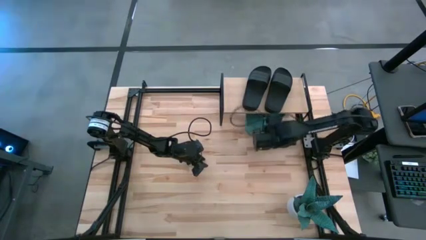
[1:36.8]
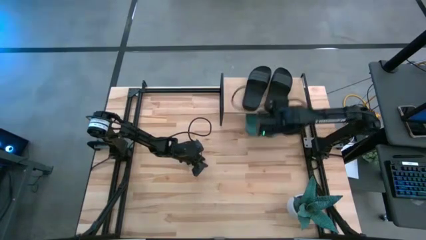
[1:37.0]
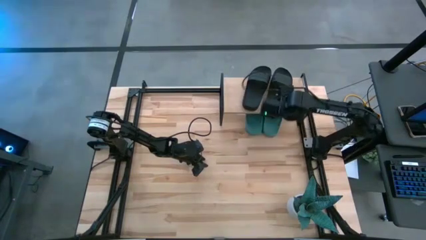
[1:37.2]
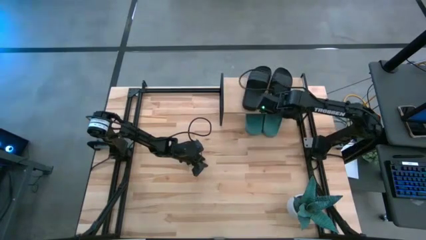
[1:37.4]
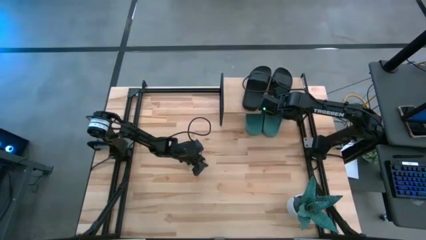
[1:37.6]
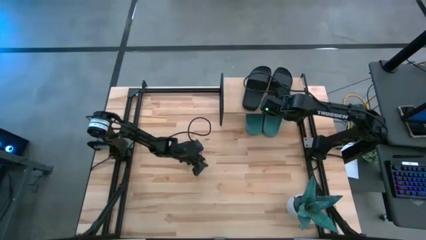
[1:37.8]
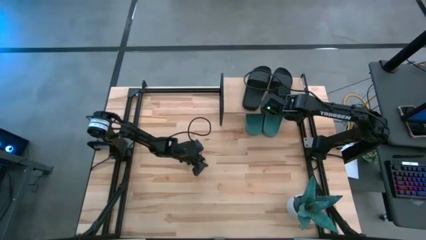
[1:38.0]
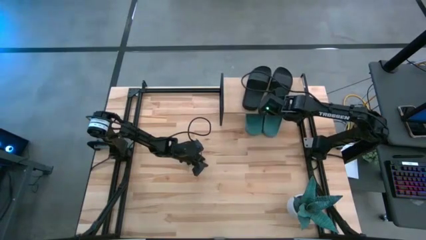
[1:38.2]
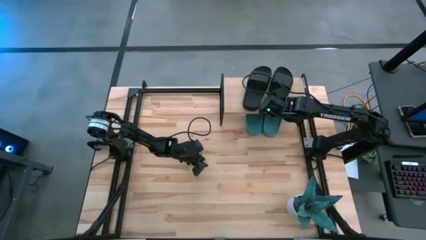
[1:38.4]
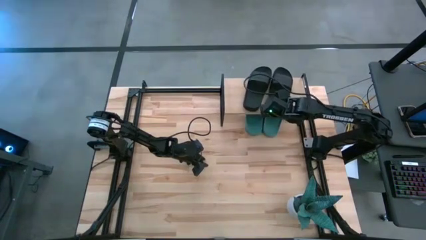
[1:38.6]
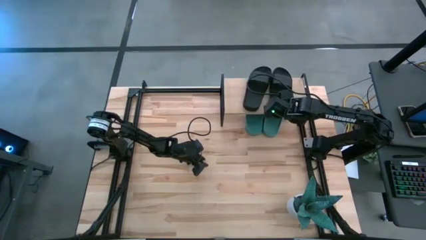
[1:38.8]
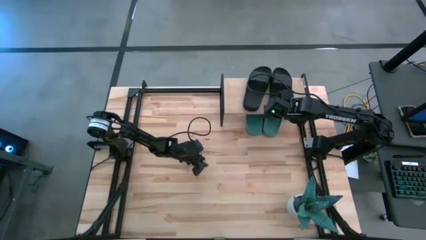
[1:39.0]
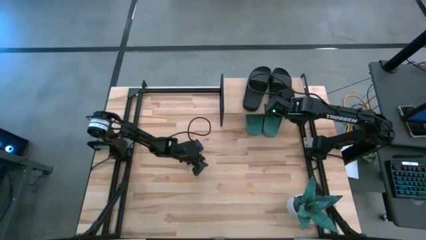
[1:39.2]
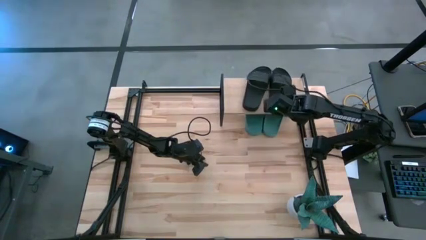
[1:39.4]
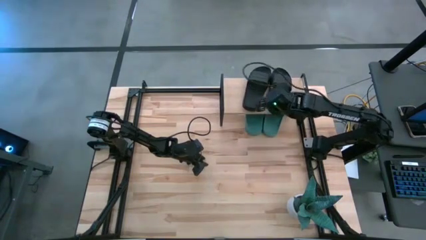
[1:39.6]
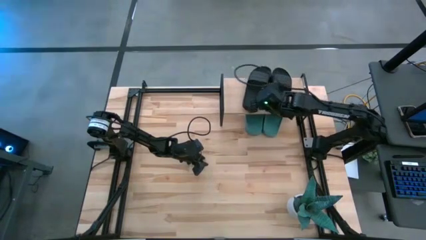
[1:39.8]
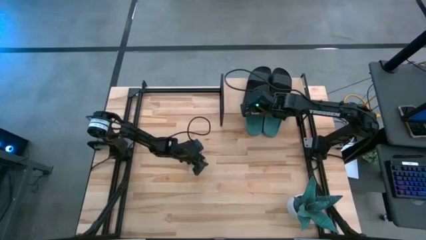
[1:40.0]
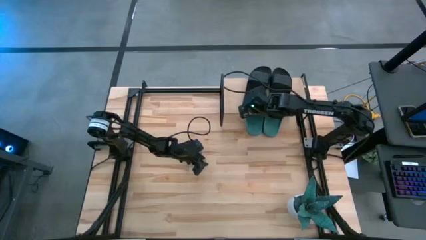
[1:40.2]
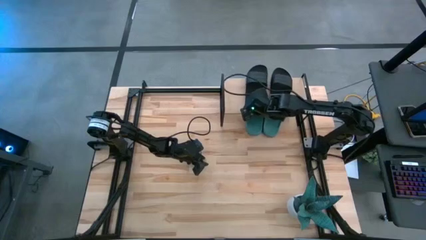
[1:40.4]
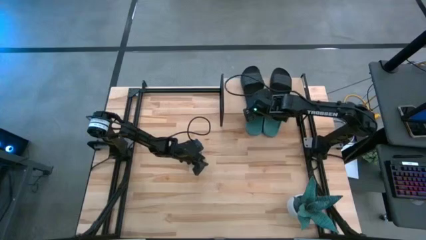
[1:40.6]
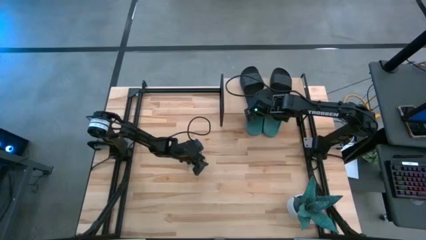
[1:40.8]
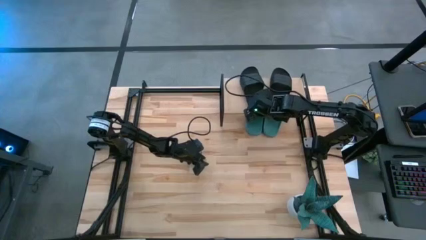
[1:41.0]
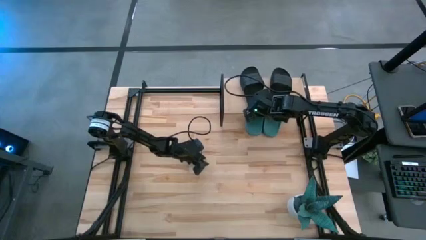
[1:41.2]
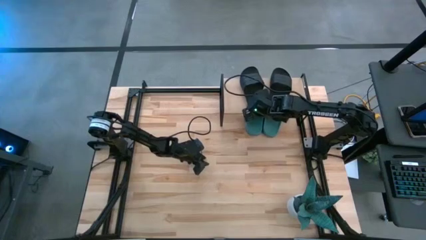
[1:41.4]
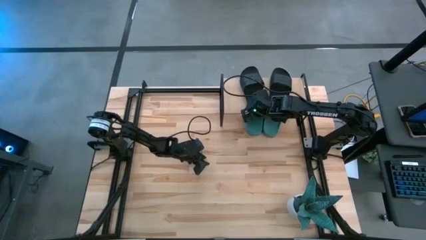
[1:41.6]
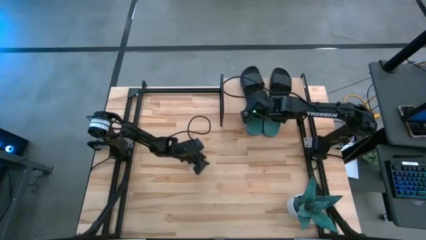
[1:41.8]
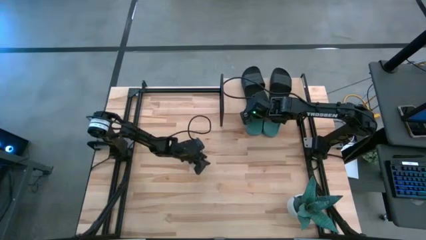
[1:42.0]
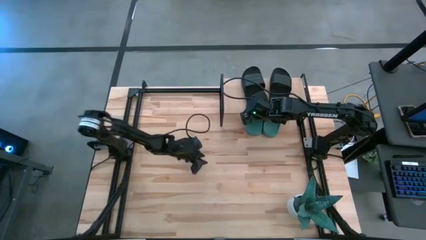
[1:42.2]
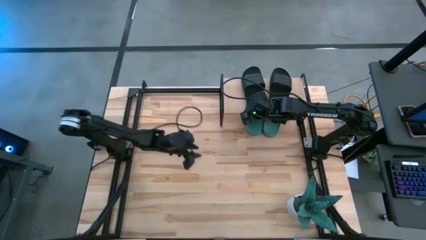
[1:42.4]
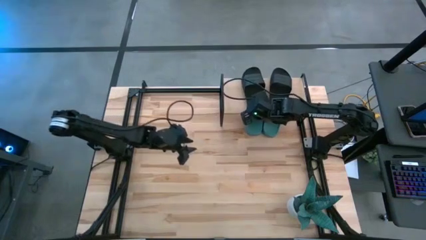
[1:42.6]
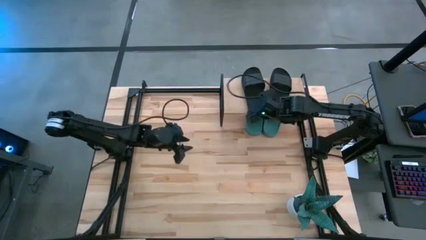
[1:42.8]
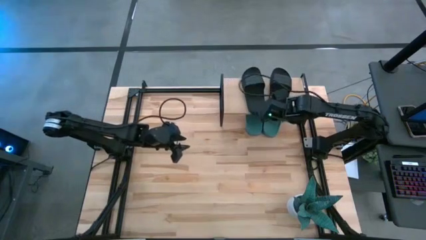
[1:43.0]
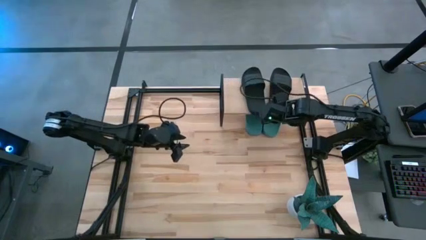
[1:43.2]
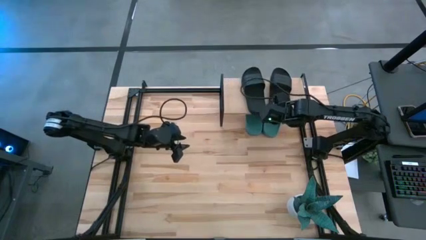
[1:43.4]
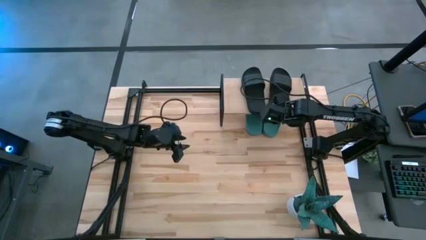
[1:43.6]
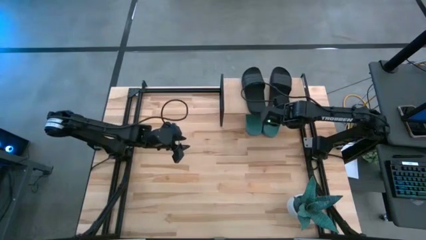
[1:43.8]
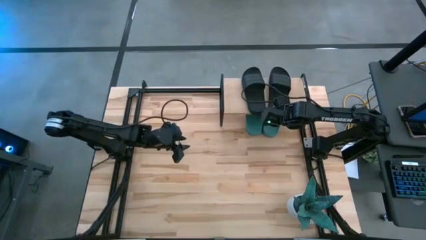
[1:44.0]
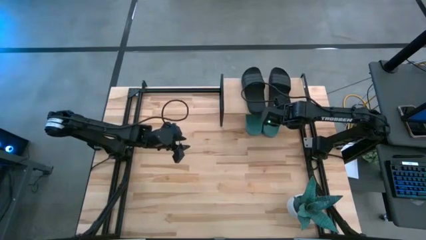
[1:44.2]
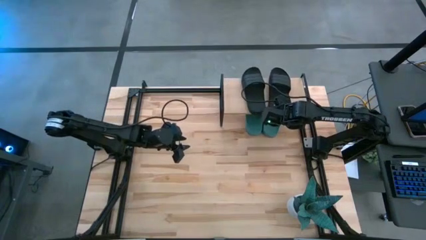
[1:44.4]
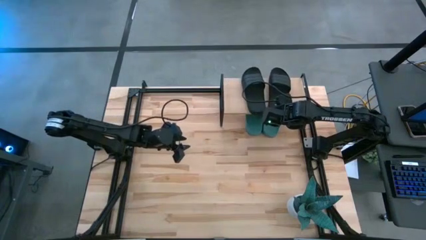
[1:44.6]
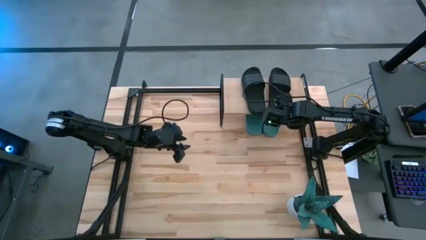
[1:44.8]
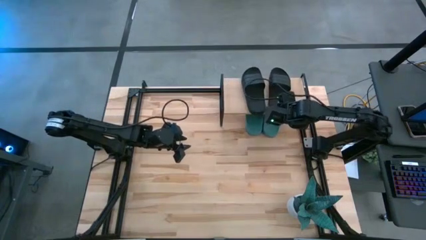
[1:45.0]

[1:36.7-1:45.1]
Task: Pick and place slides into the shelf
Adjust the black slippers on the shelf

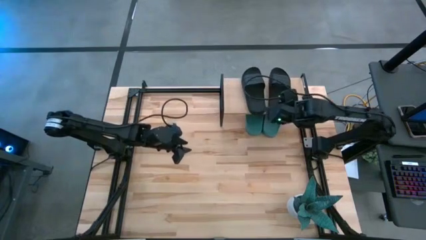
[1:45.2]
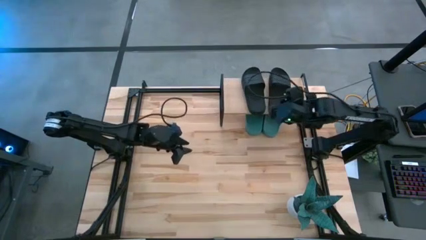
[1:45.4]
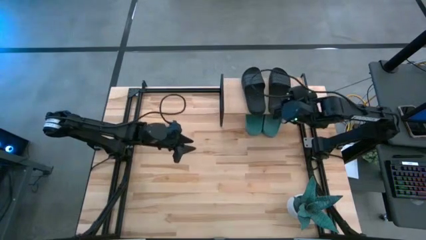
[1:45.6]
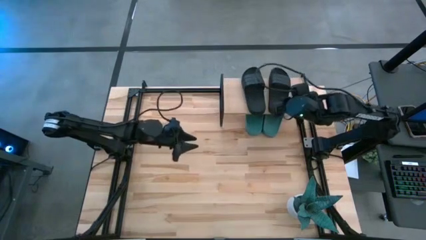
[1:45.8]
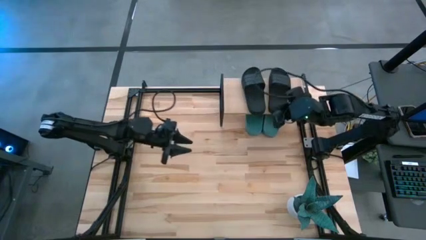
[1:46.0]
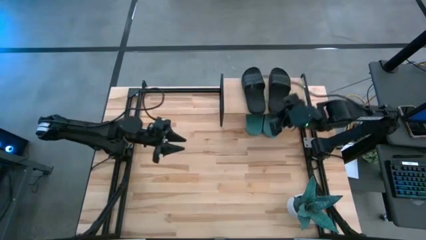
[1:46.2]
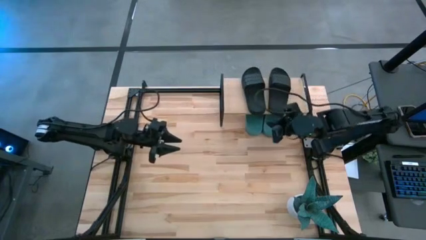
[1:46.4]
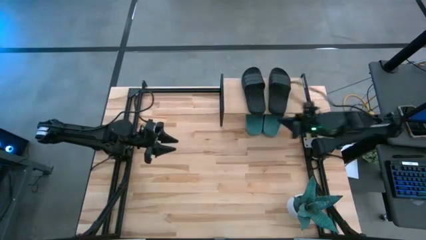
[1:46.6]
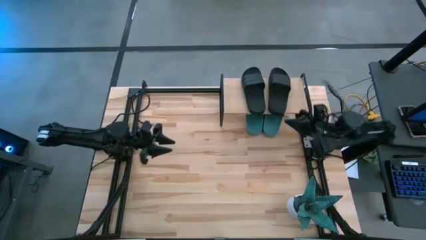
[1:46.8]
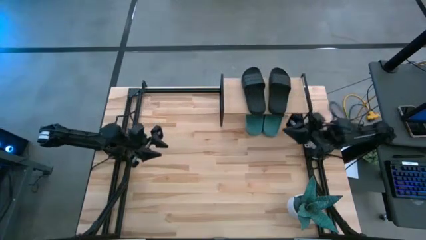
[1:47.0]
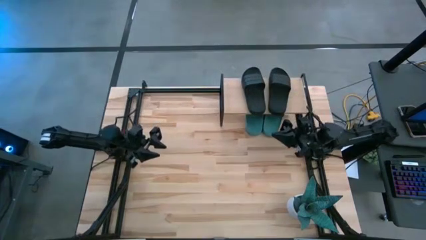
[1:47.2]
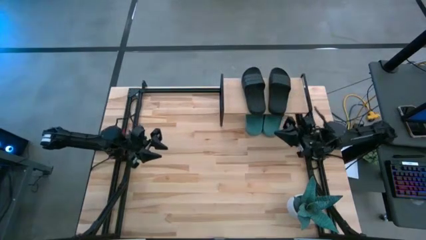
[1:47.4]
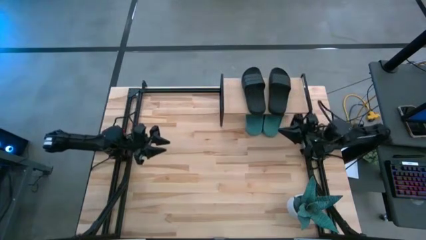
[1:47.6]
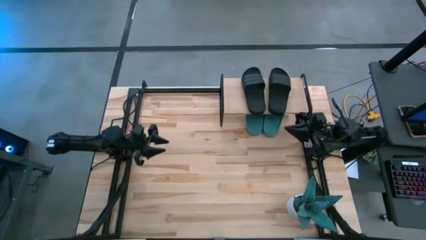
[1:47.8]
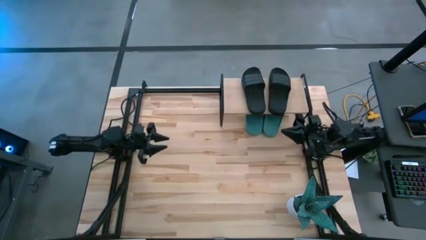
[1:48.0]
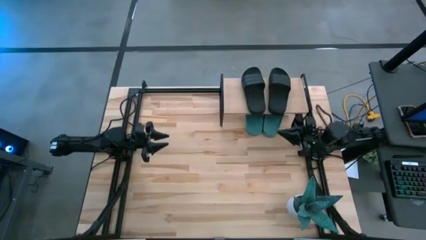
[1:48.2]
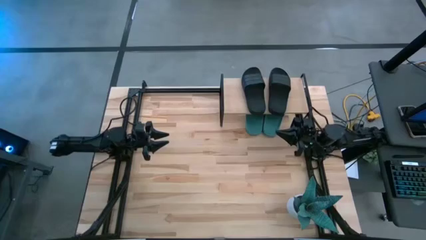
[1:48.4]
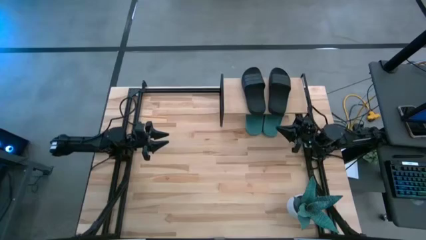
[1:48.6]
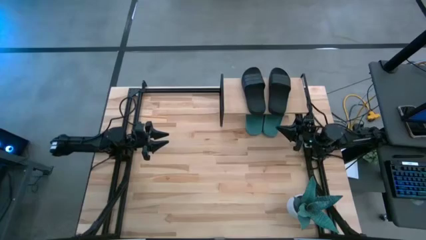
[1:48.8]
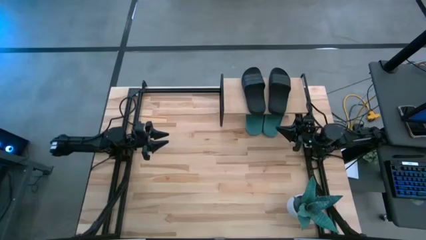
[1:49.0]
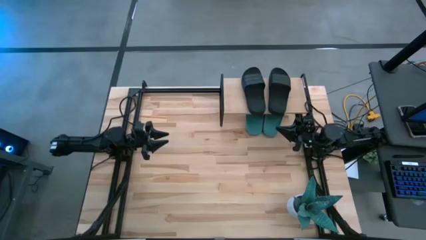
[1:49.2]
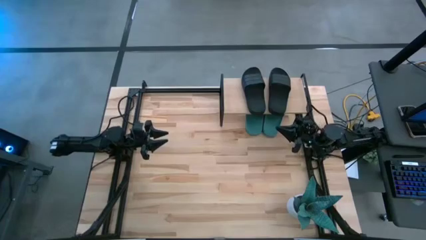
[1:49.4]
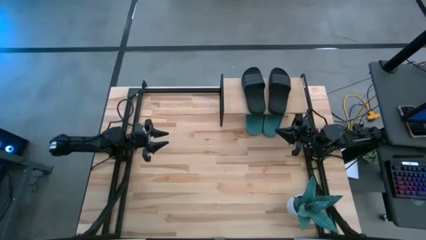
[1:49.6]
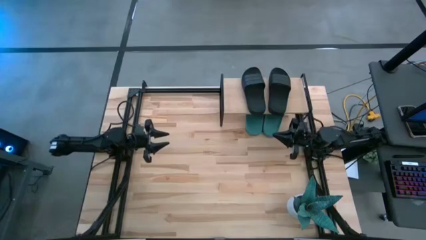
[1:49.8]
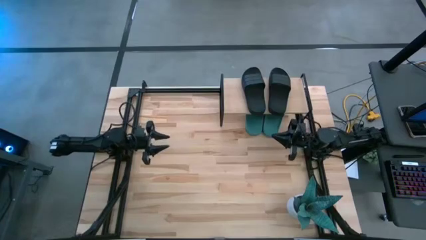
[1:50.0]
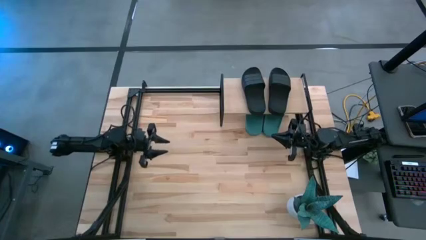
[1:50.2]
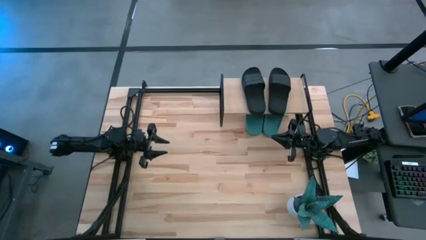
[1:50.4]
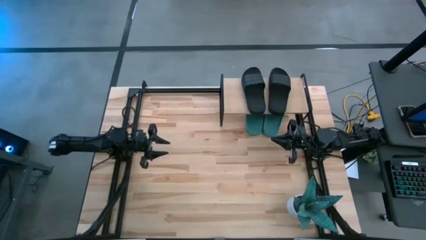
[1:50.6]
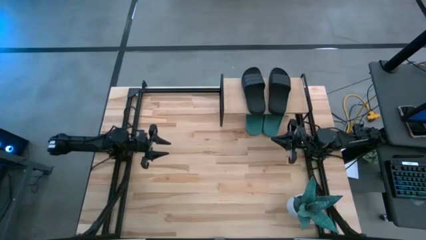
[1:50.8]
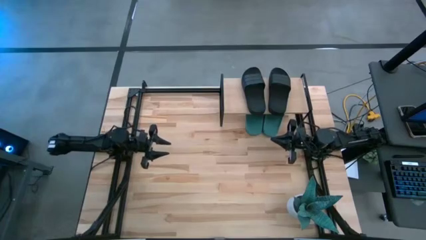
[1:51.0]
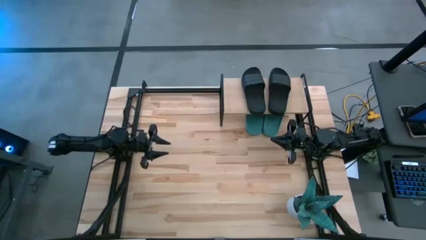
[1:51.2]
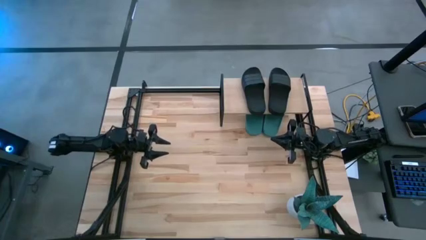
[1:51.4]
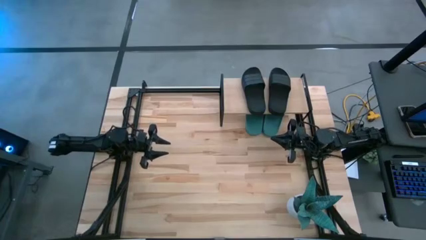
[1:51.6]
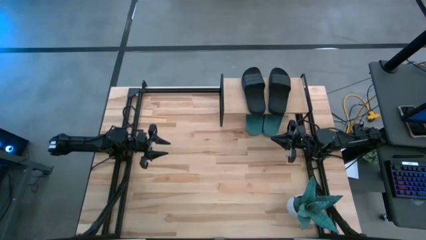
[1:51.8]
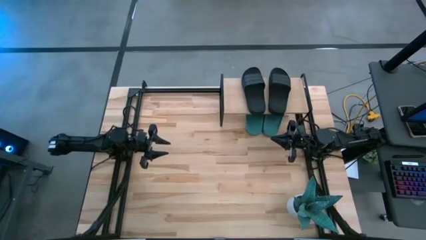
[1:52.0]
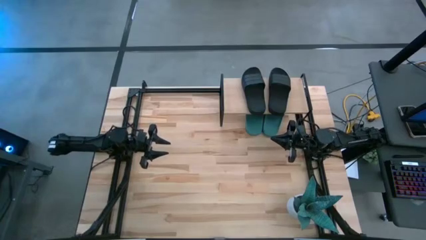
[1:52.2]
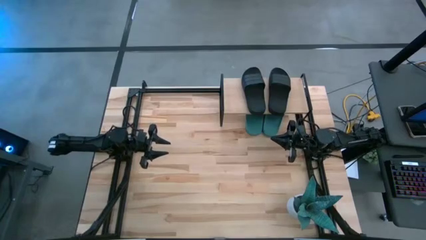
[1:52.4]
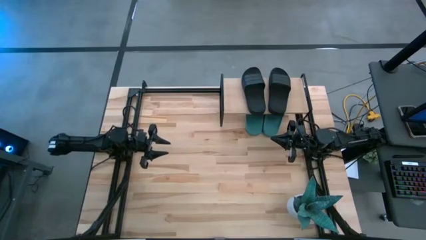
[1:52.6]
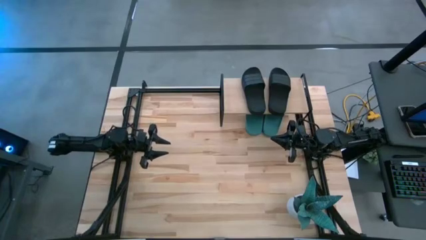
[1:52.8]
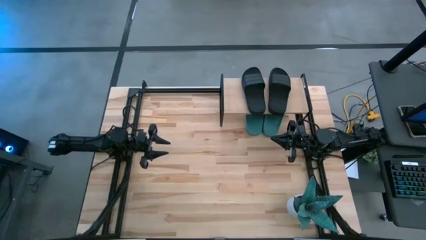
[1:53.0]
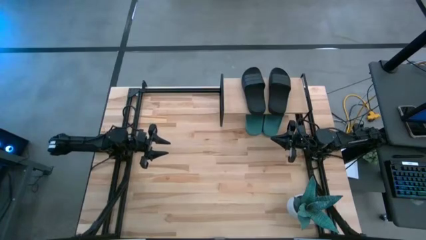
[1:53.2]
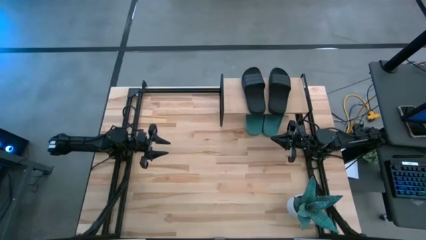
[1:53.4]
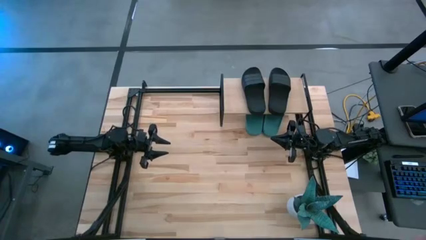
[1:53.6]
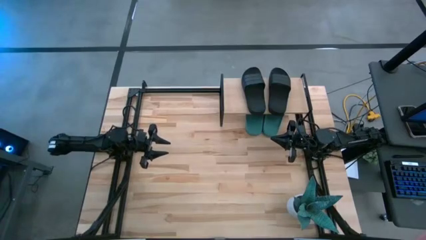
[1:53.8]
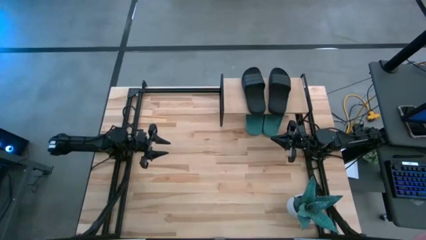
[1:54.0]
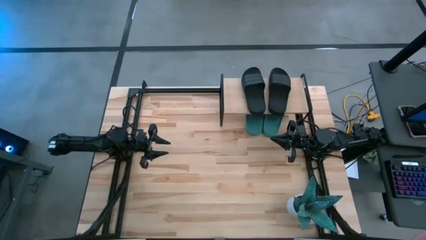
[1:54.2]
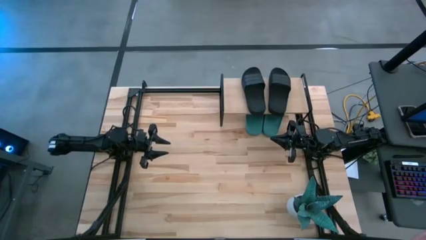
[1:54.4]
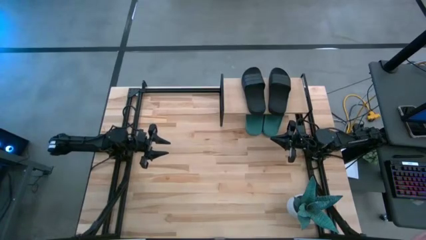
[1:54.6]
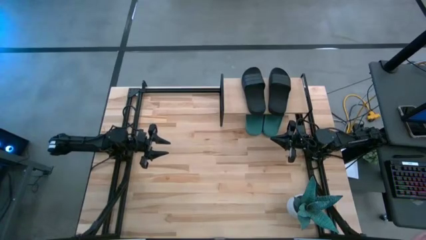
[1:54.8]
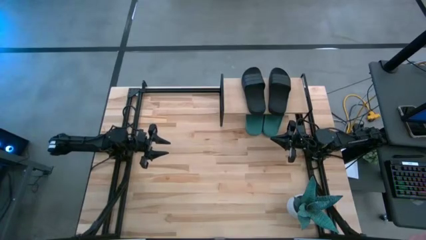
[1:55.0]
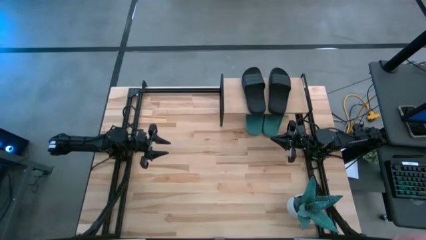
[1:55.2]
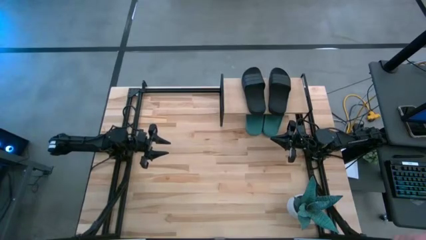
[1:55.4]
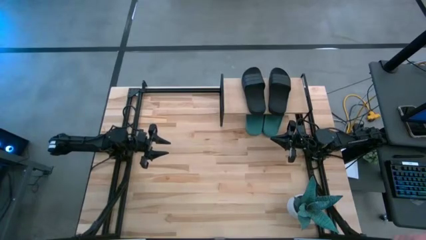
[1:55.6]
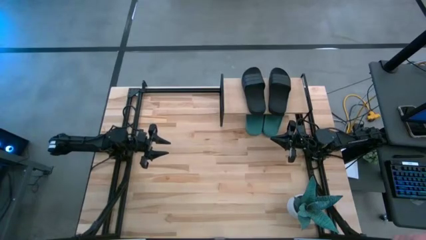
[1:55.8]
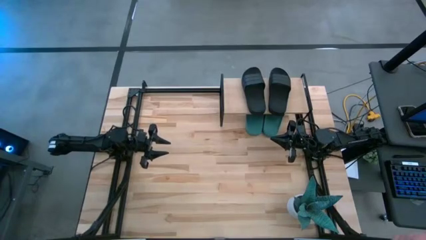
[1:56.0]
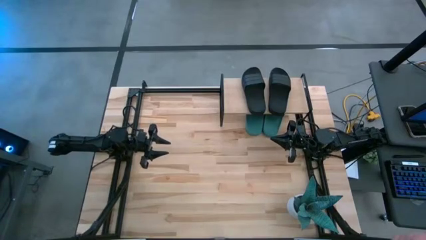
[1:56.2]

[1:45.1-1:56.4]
Return to Home Position
